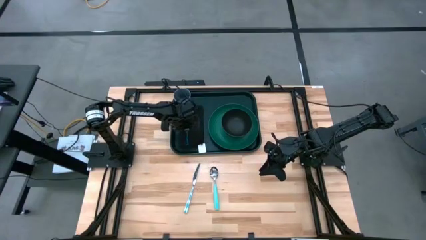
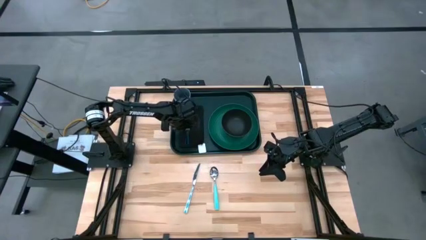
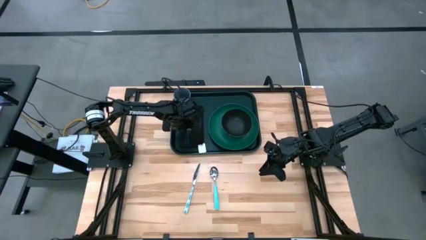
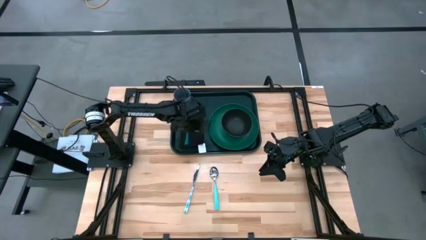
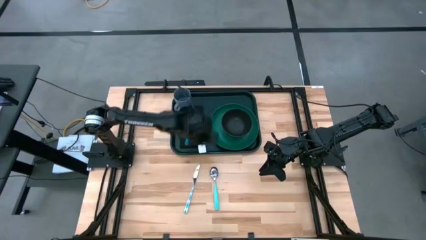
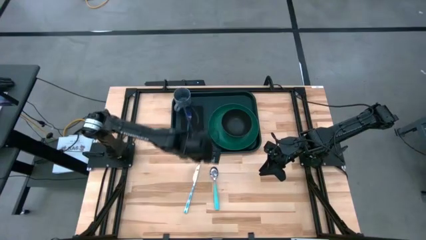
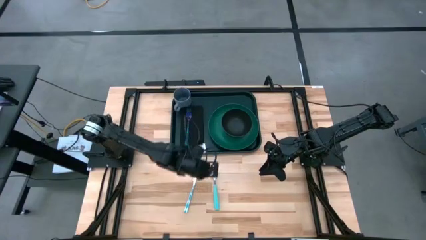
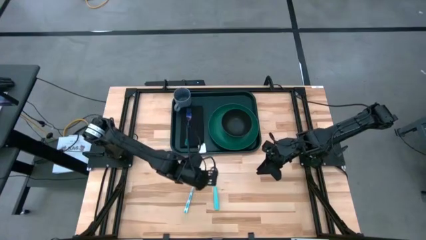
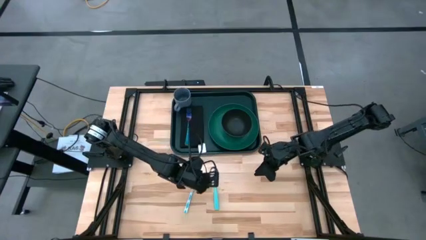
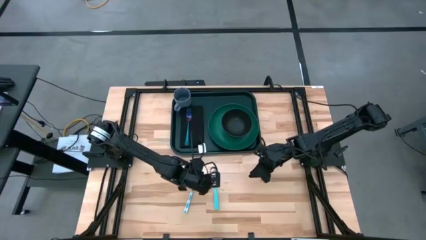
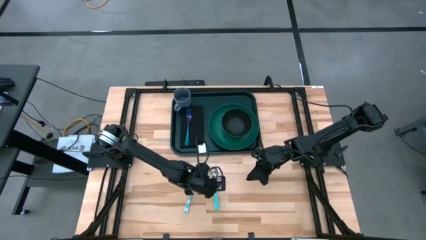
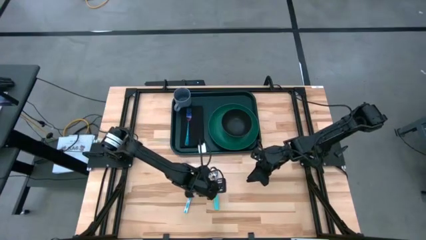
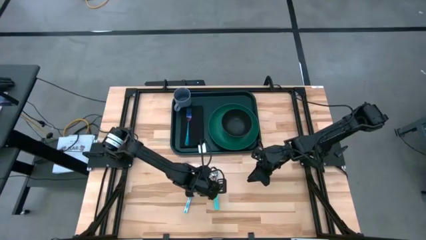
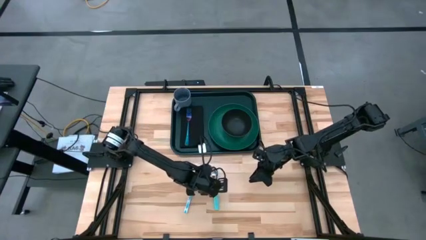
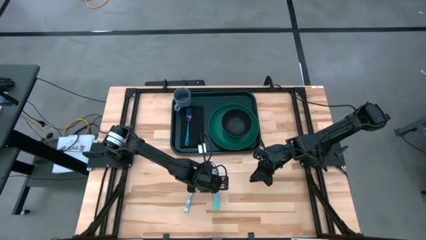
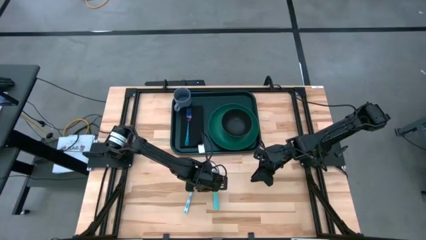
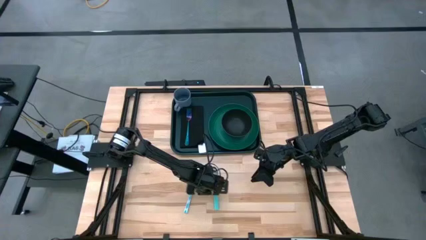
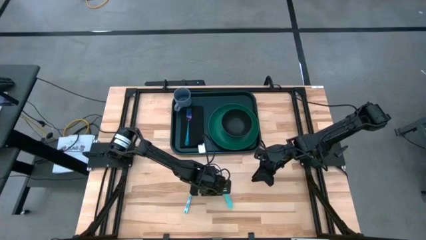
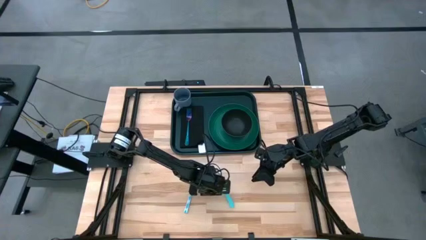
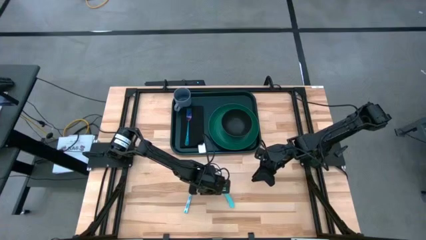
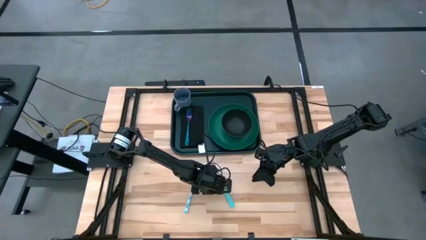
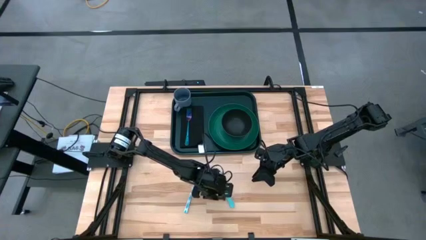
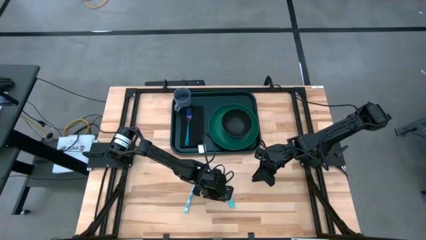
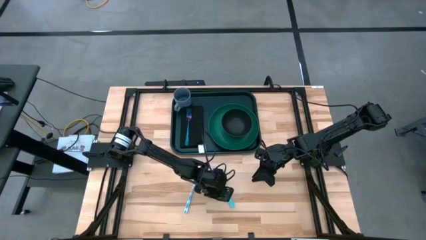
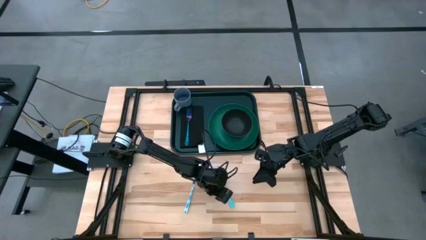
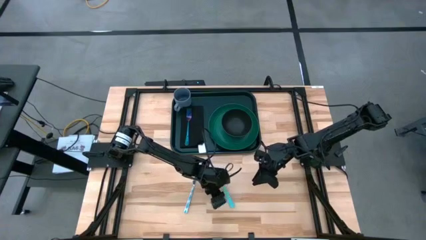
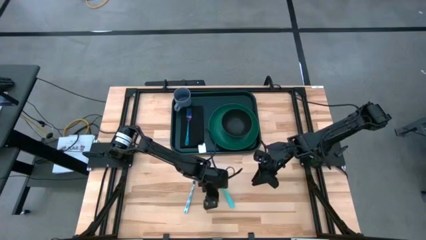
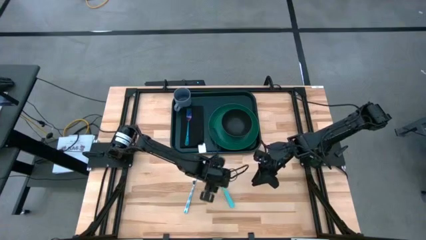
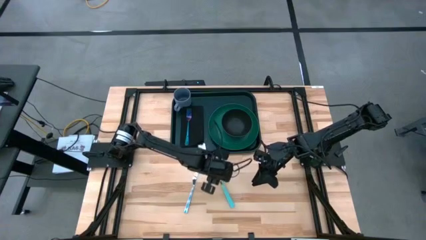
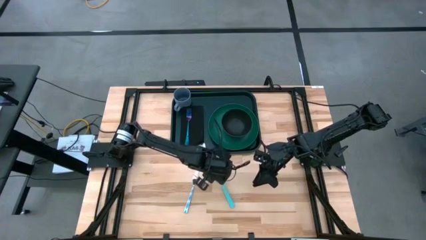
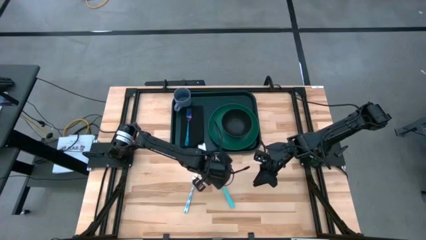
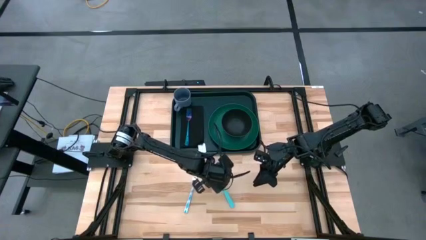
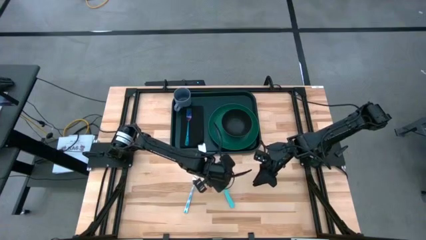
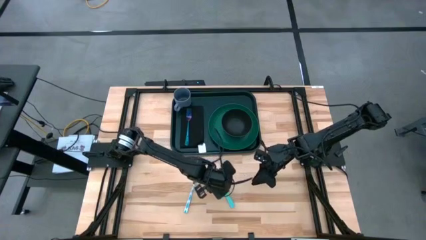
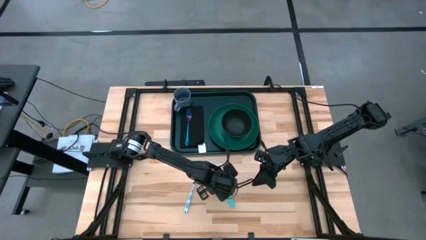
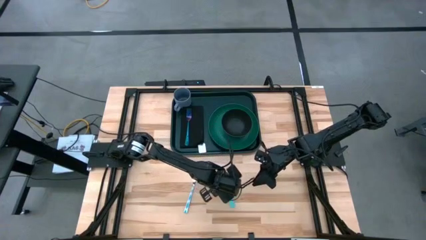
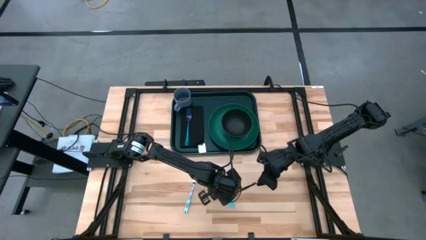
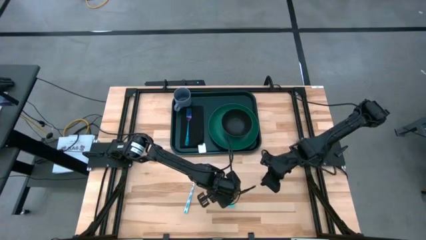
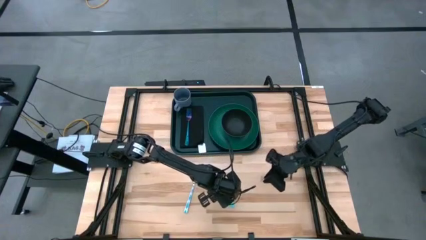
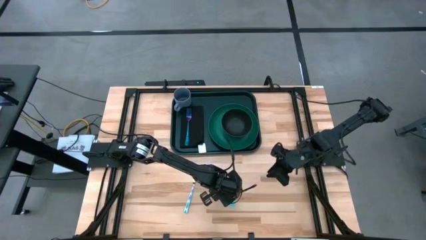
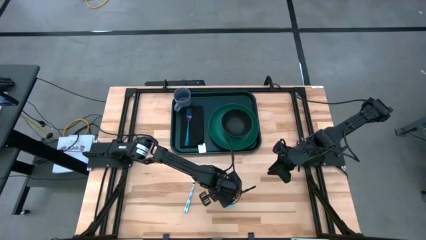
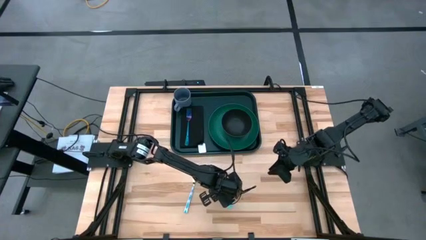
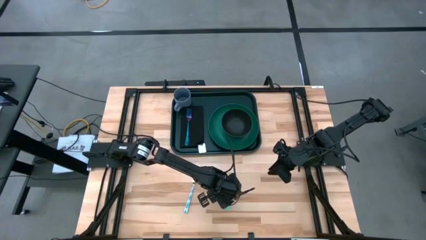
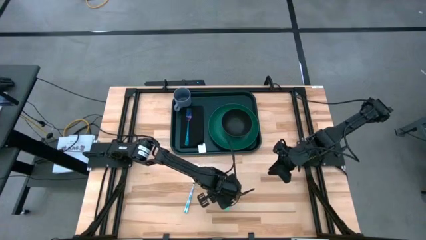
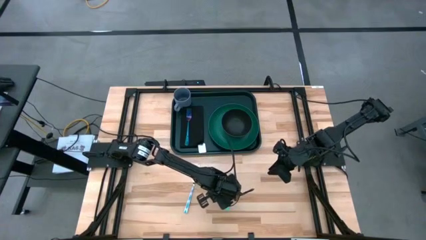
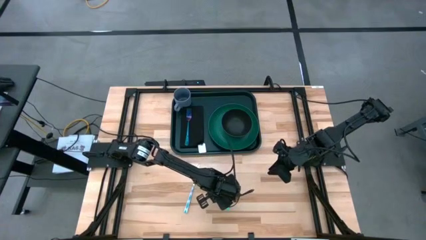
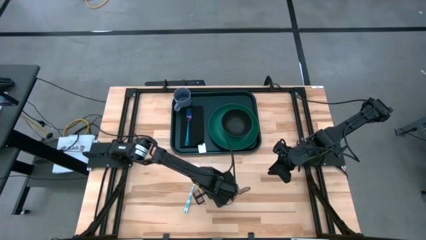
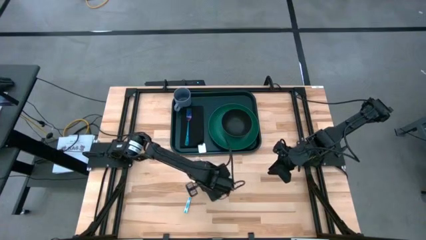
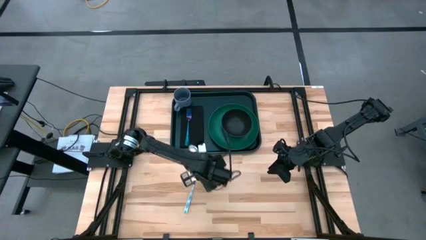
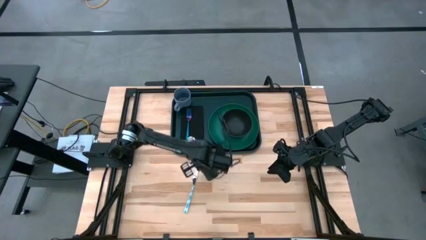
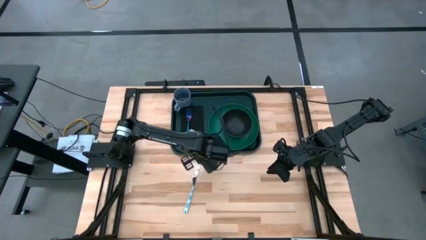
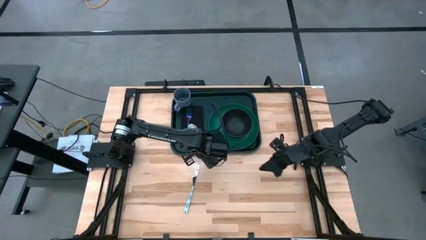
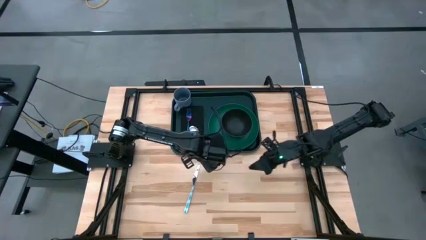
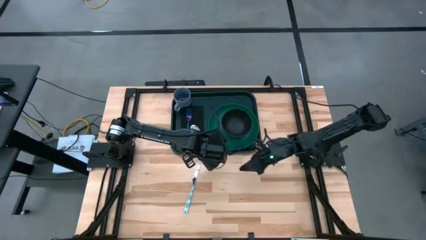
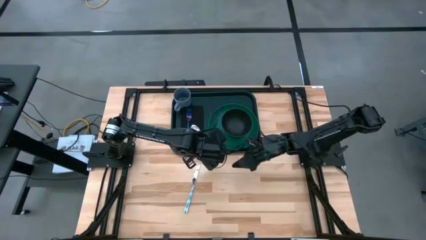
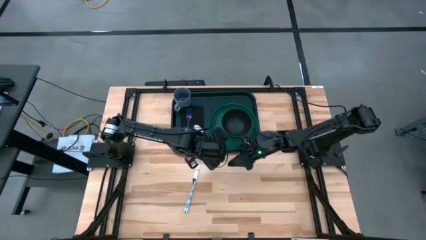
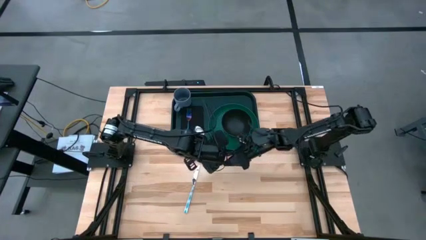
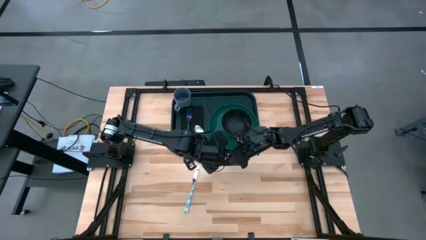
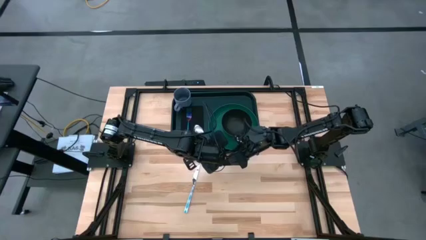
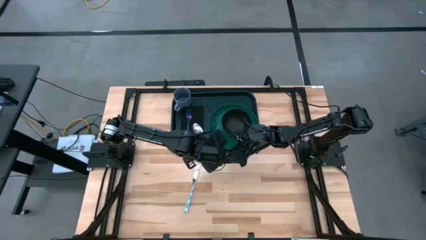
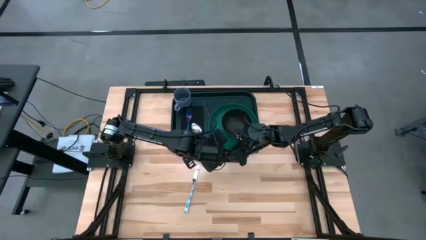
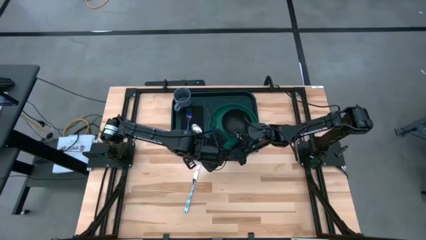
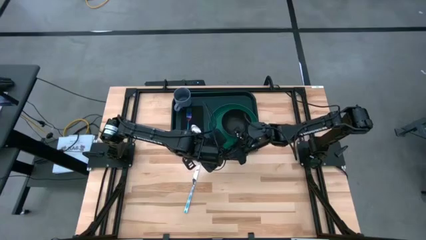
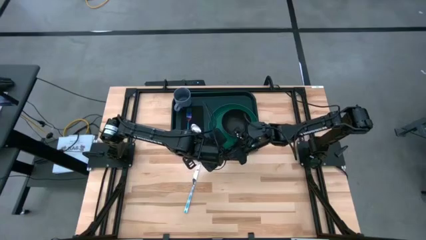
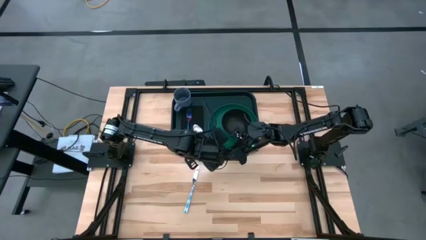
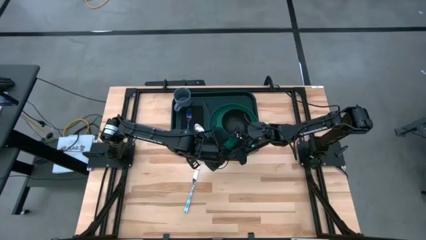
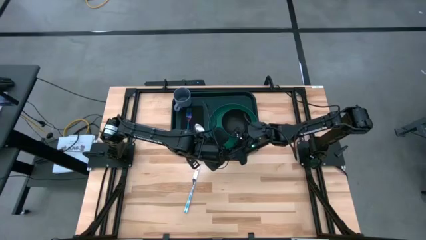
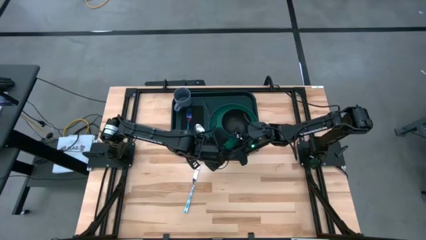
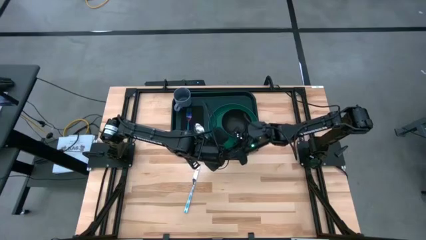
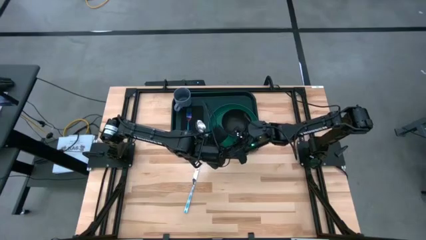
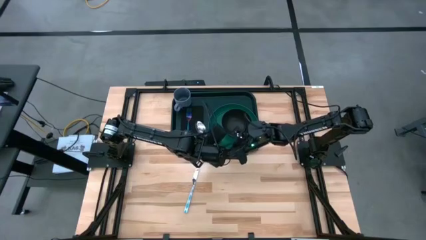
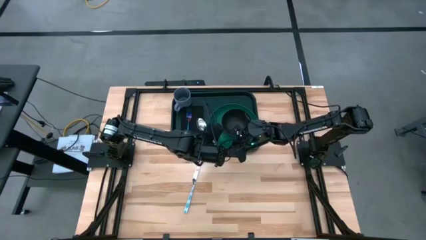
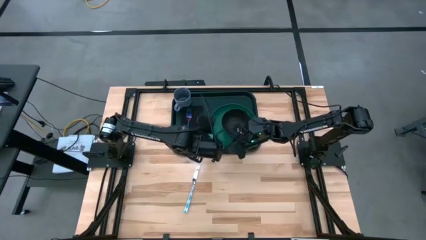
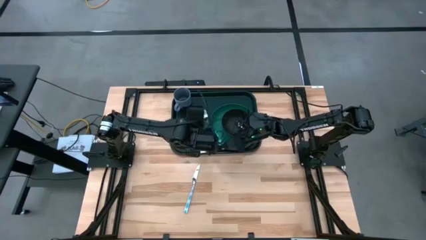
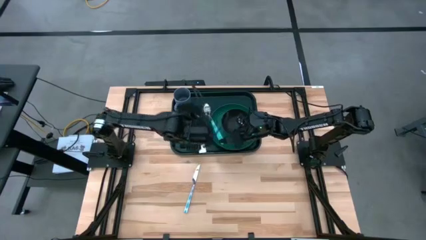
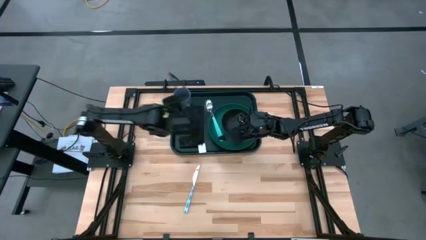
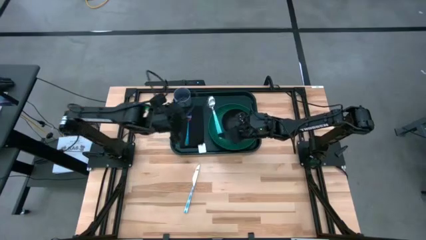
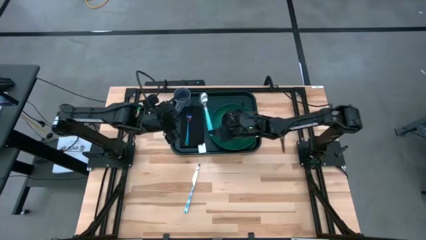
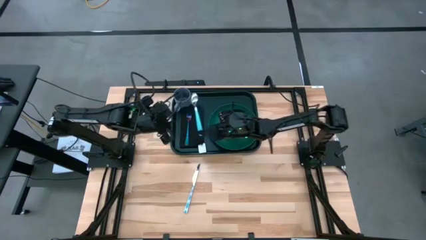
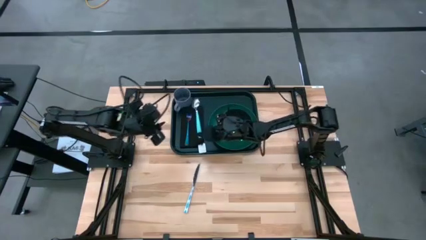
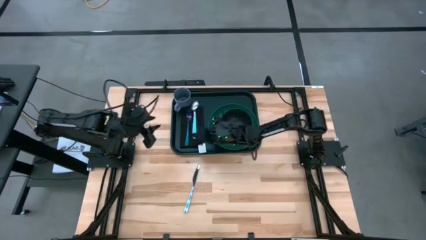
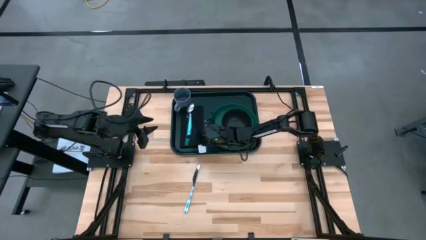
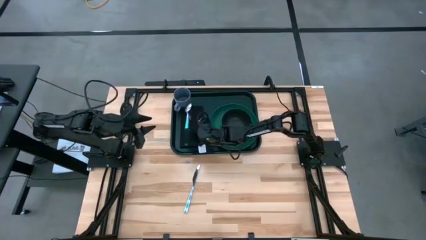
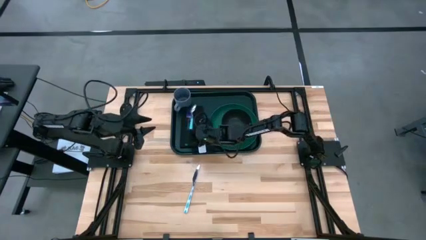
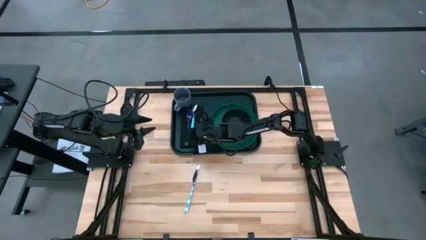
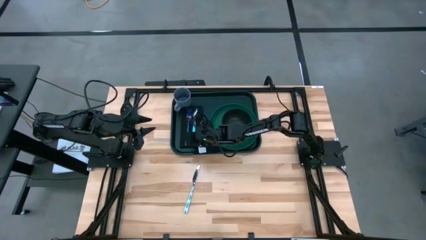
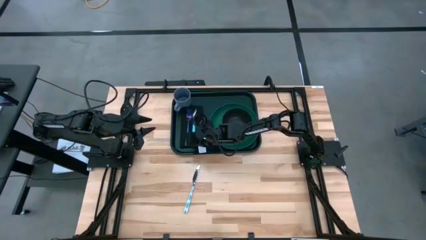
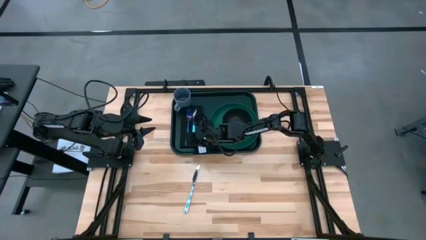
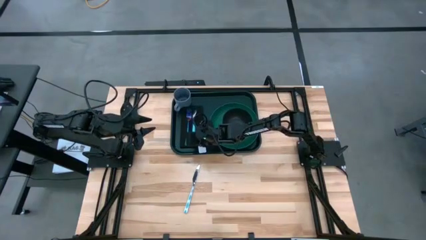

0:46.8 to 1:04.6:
Task: Set up tray
Put the blue spoon to the right of the blue fork on the black napkin
